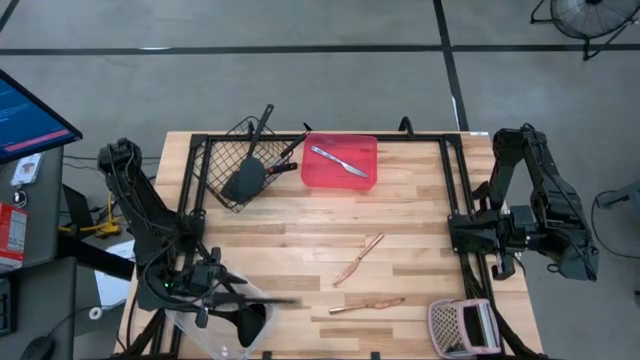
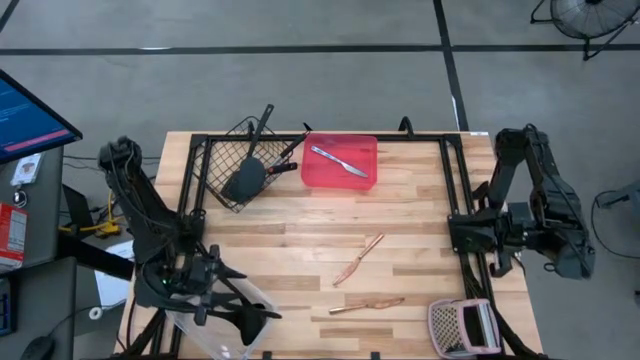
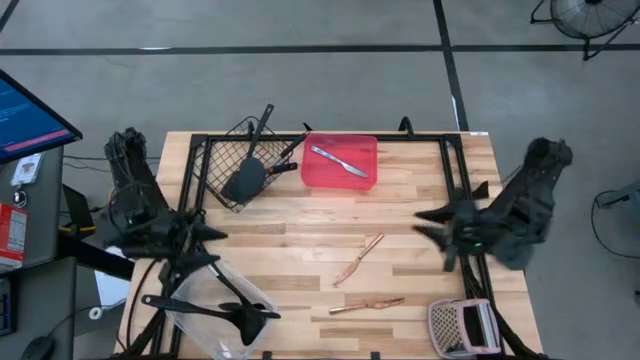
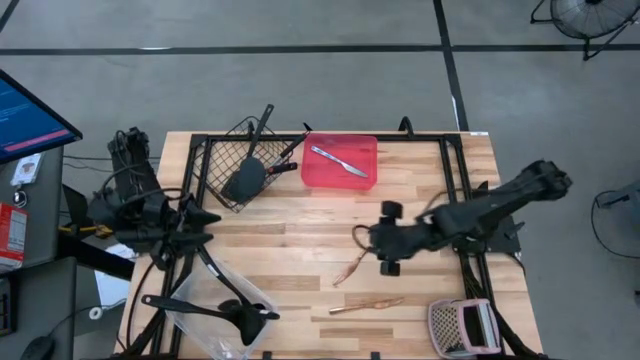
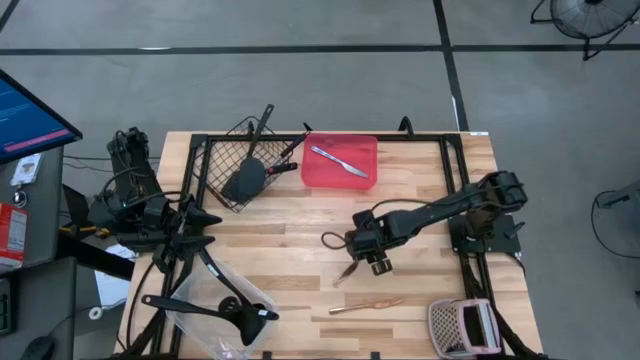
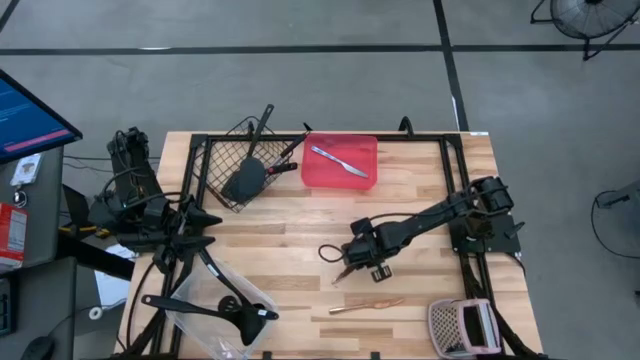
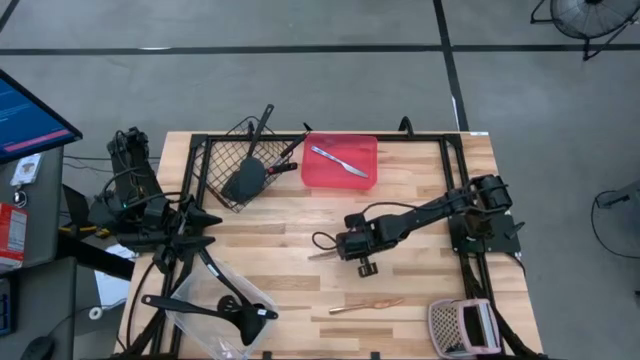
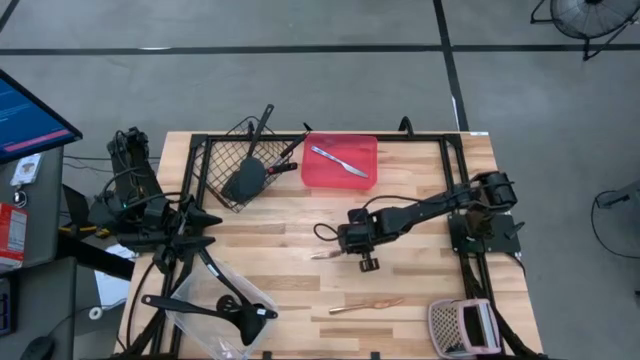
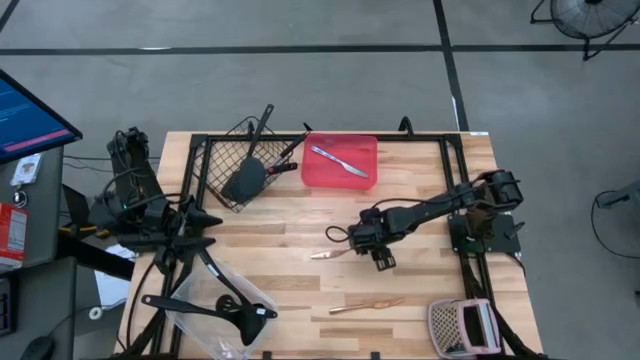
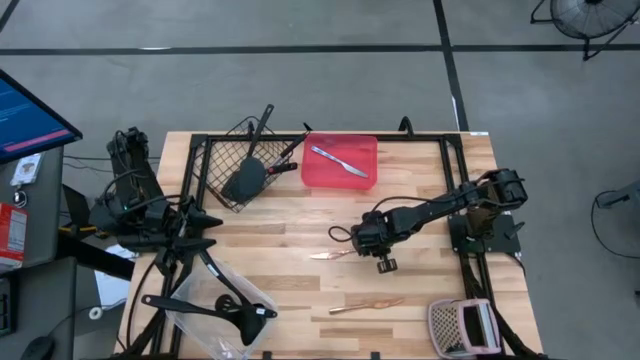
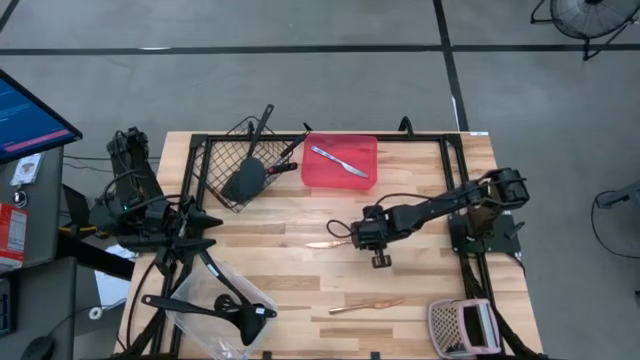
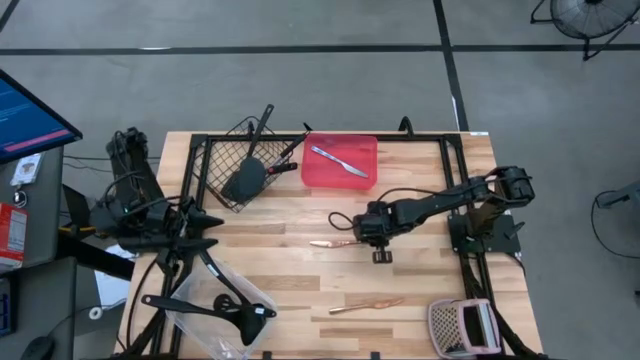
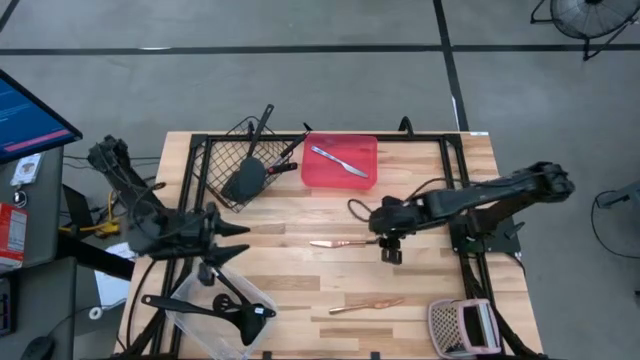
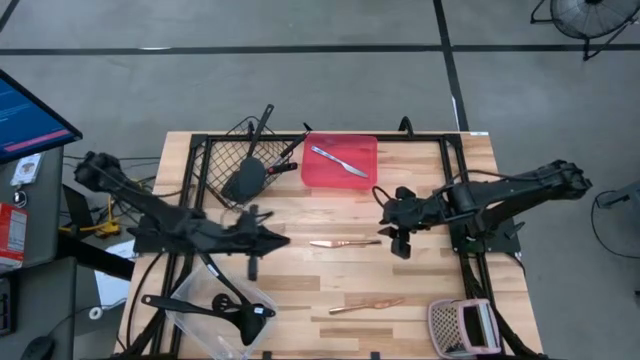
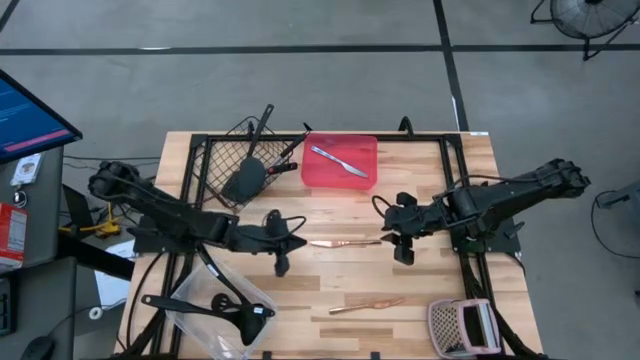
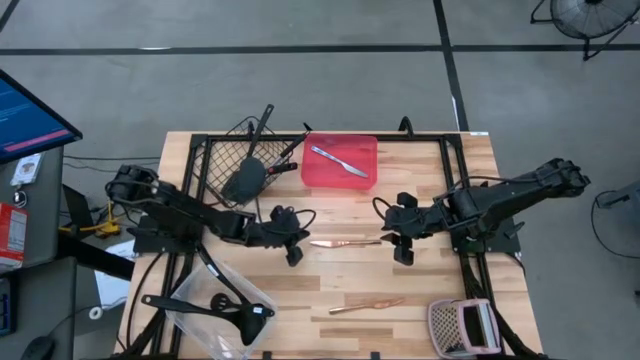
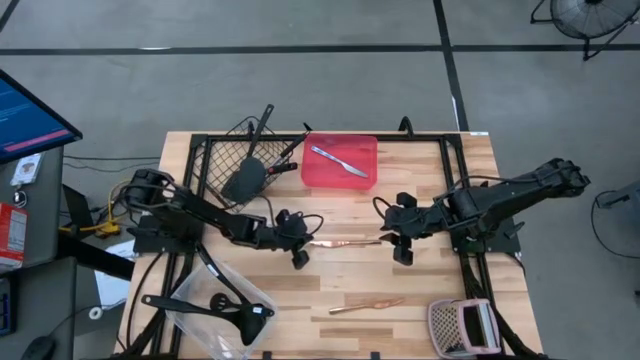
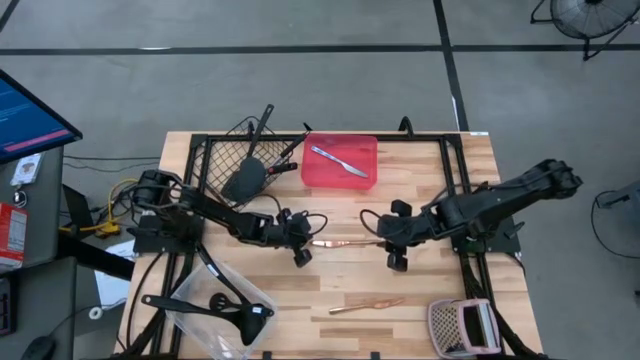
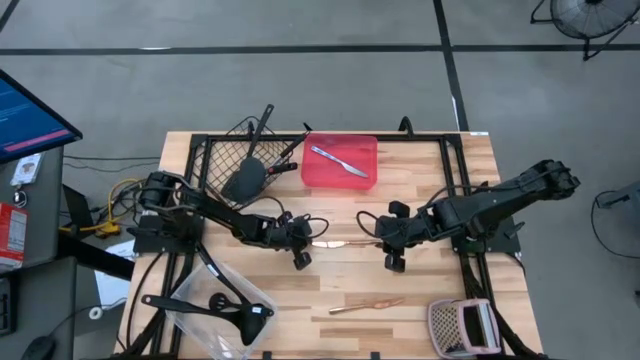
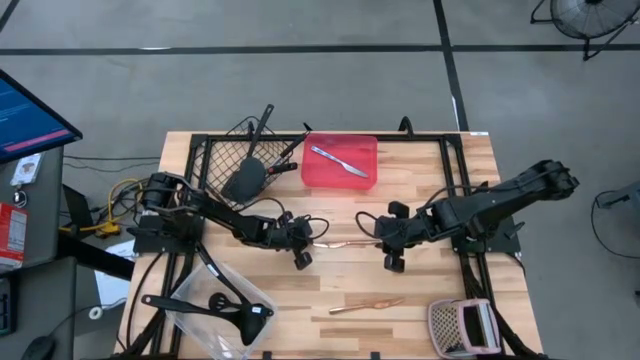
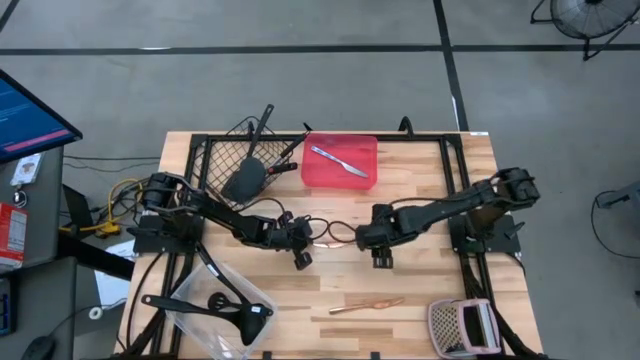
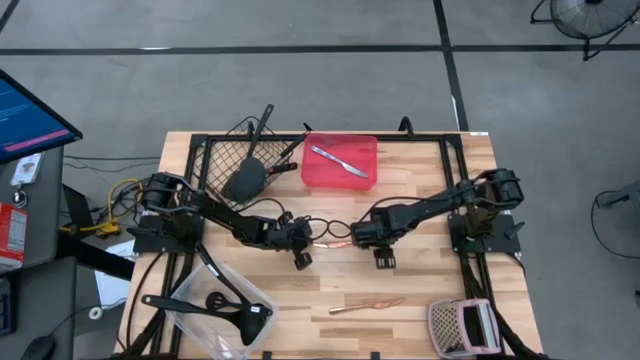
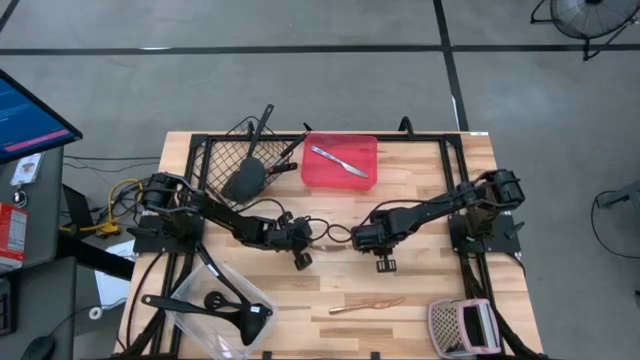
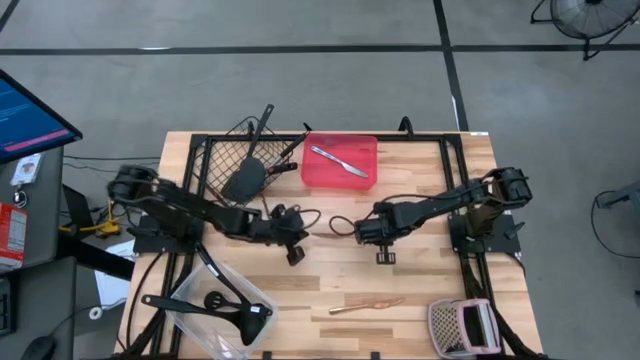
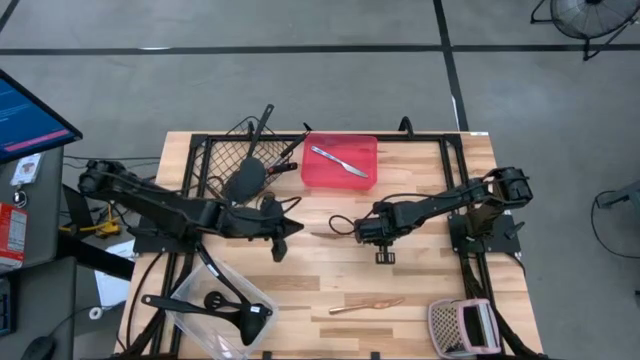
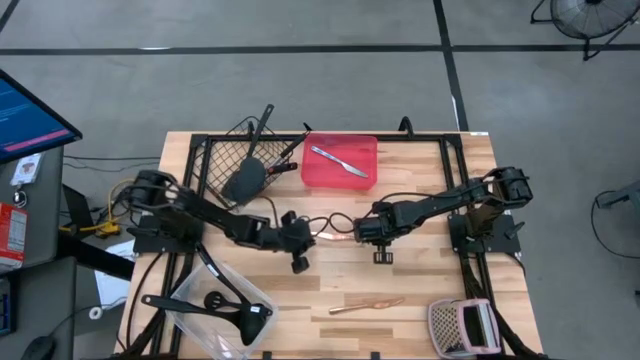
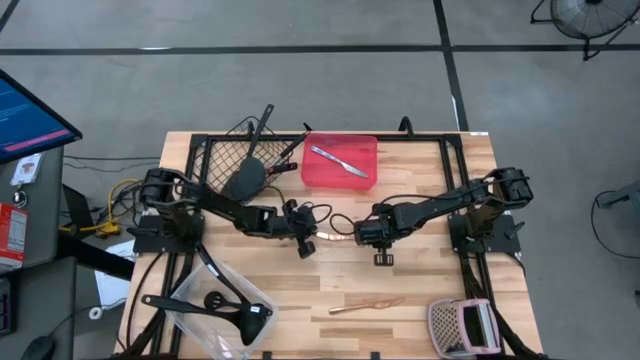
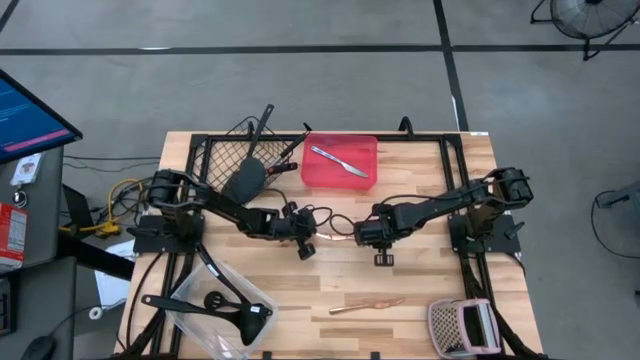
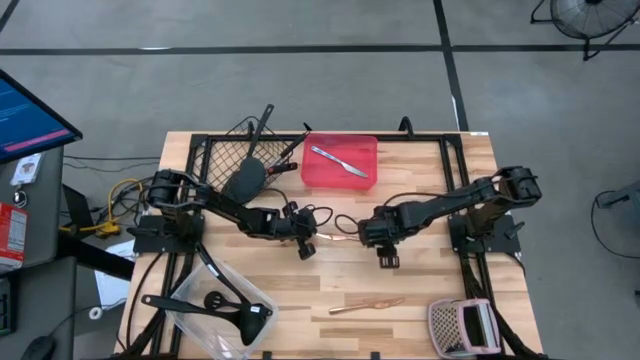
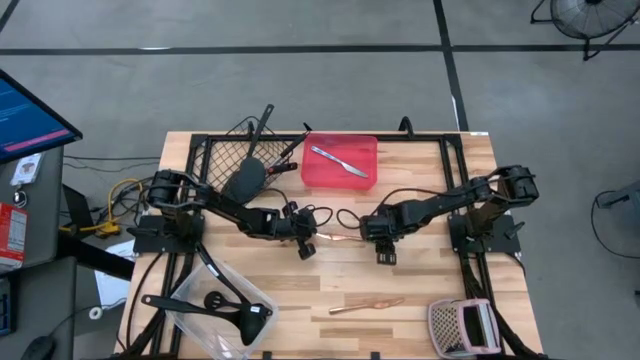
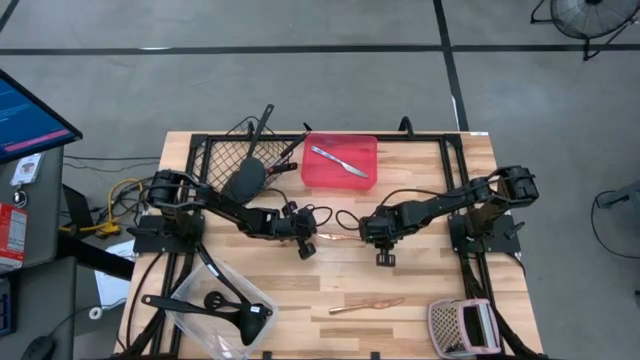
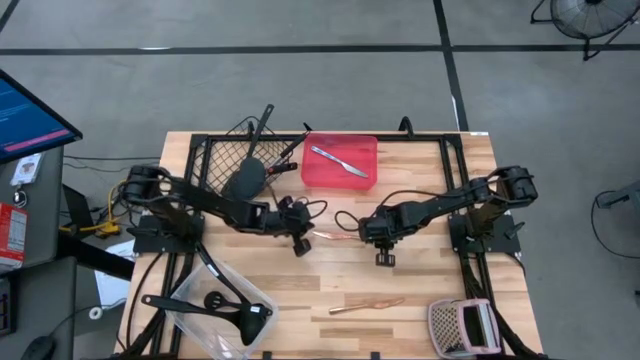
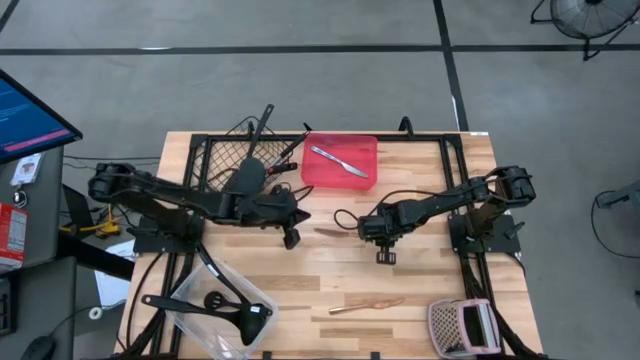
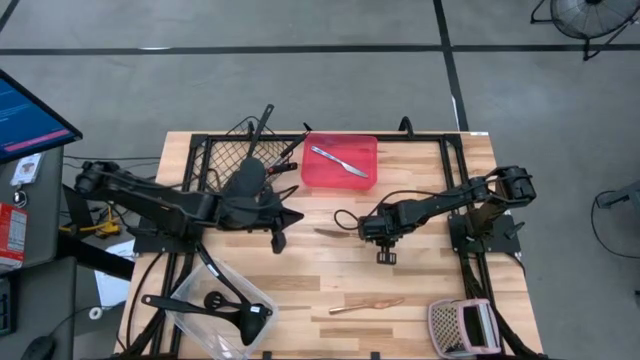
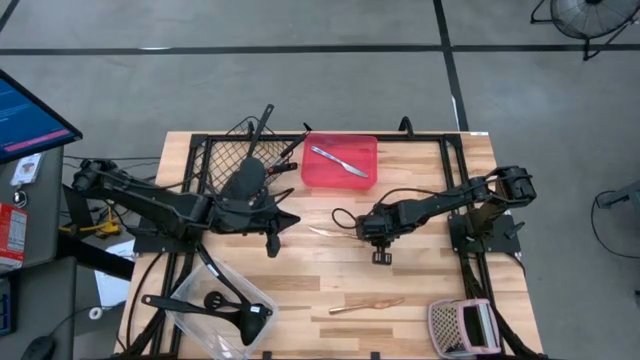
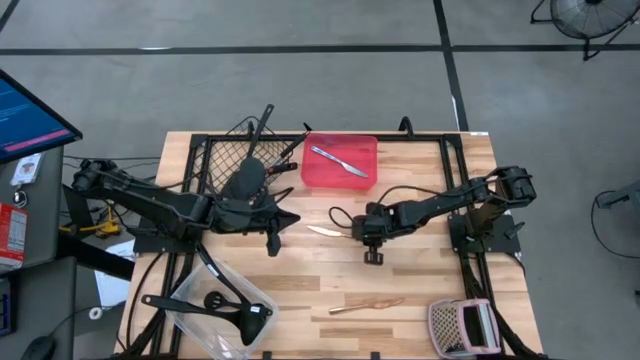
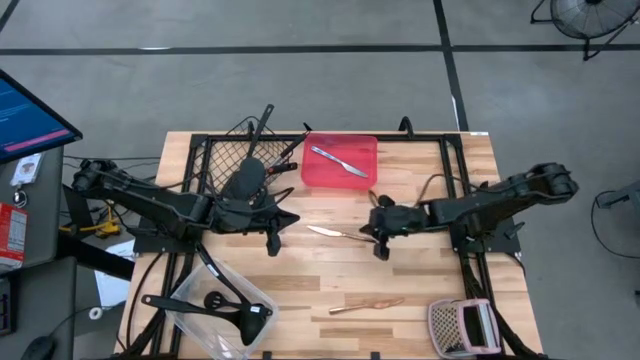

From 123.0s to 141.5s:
Task: Pick & Place Kitchen Items
Put the gold table knife into the red bin

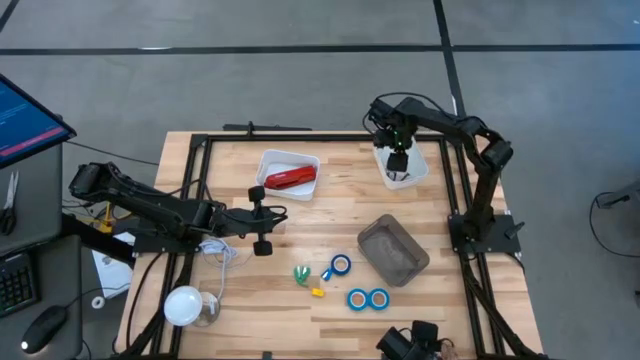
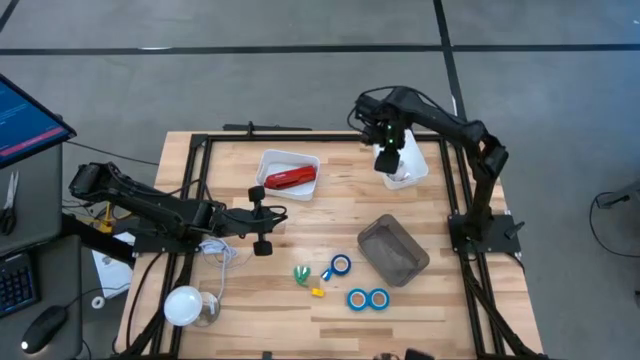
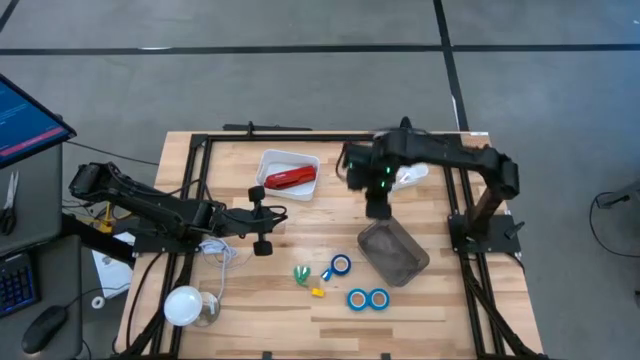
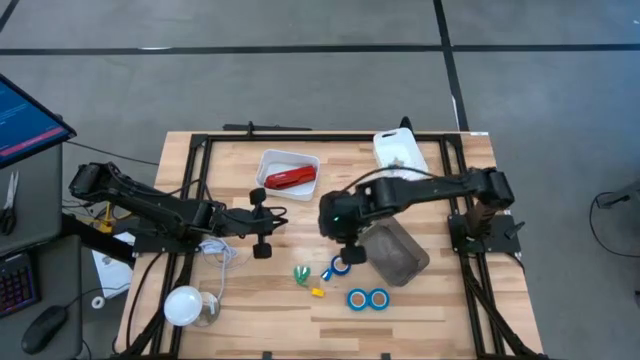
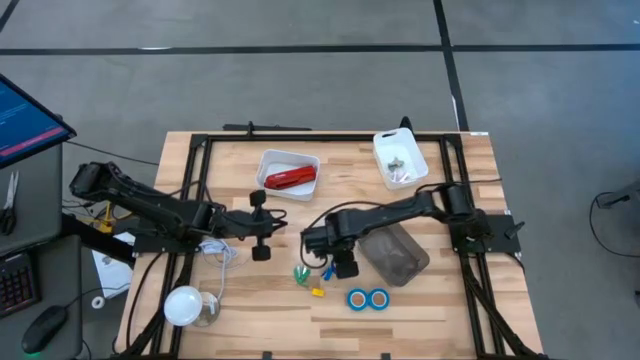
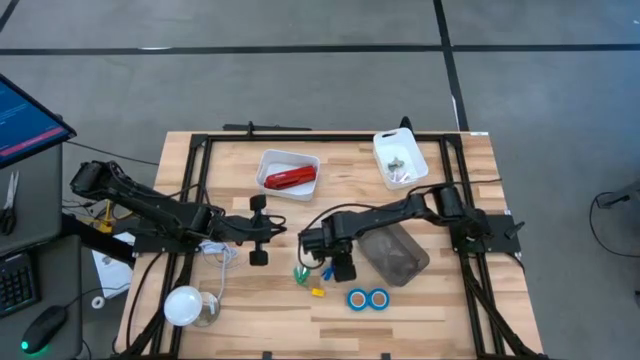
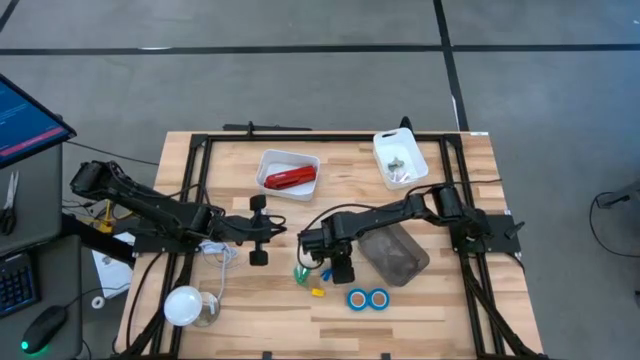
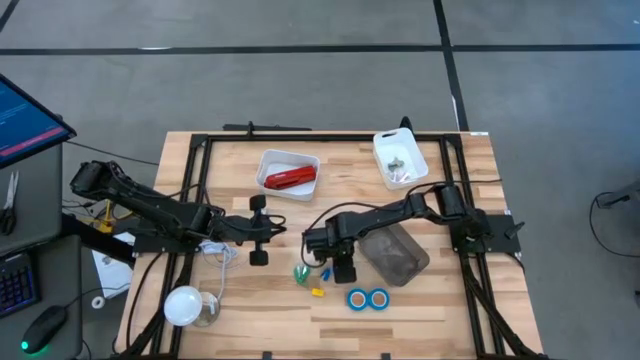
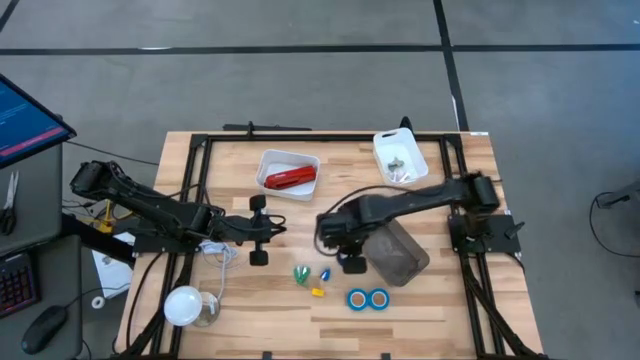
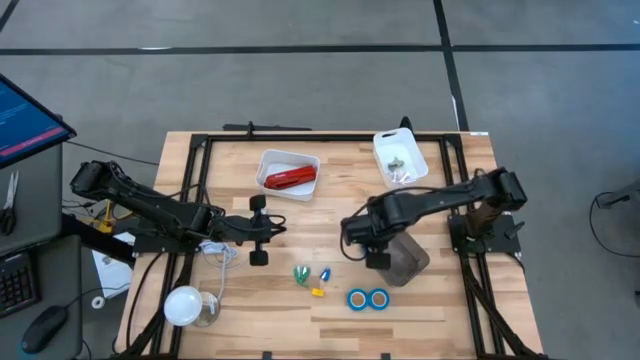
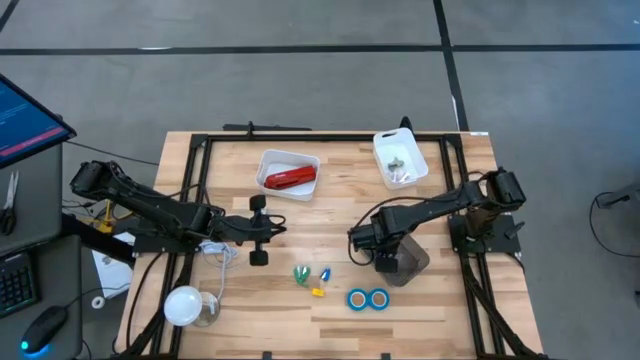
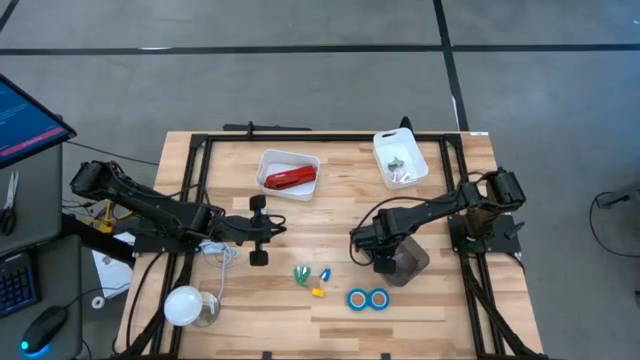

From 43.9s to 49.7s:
Task: Pick and place Stapler, Stapler remover, tape
Put the blue tape into the black bin
